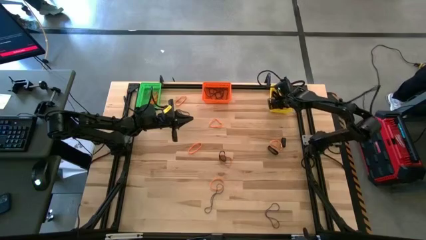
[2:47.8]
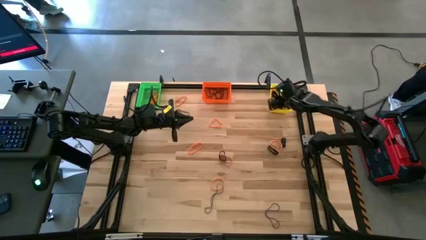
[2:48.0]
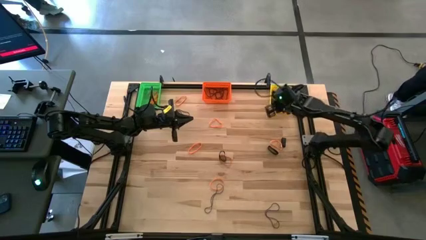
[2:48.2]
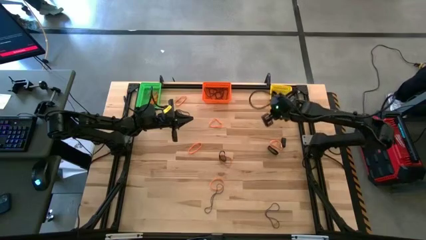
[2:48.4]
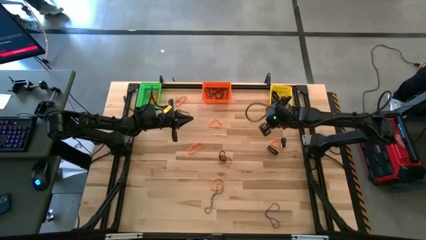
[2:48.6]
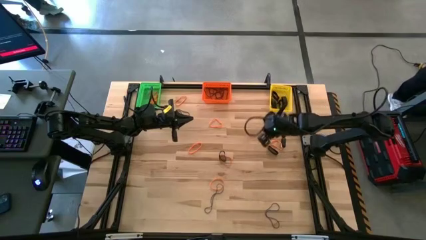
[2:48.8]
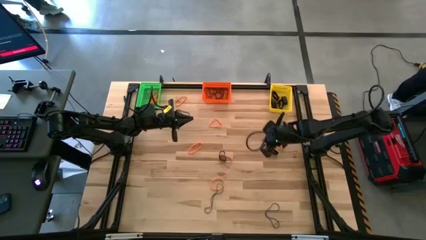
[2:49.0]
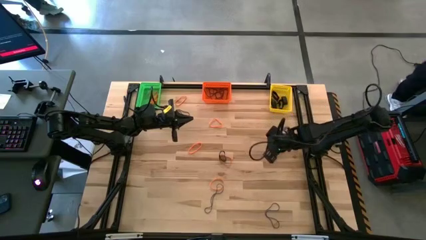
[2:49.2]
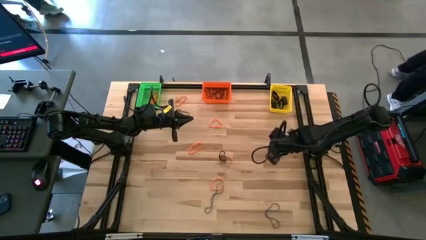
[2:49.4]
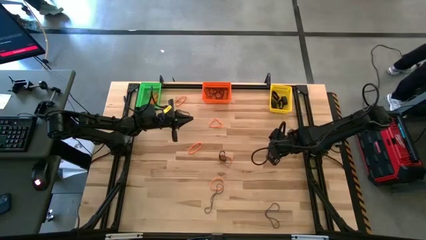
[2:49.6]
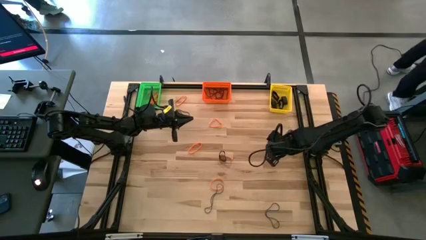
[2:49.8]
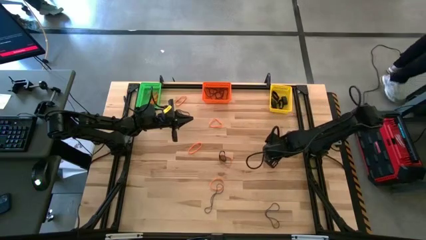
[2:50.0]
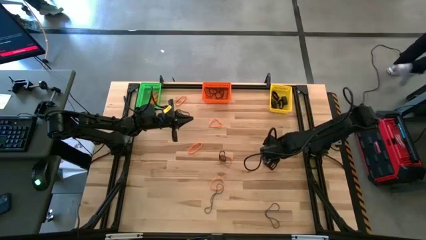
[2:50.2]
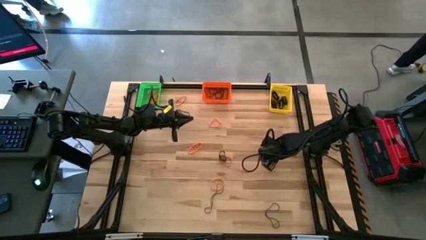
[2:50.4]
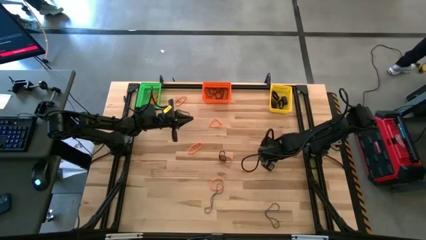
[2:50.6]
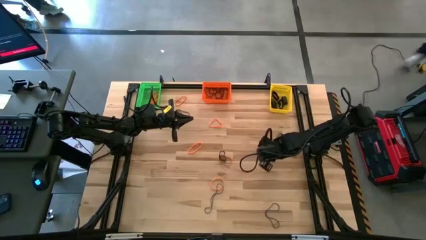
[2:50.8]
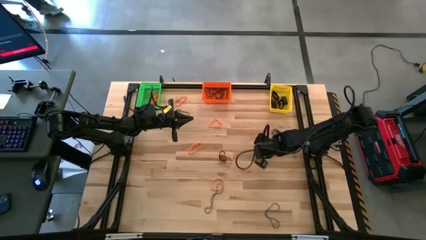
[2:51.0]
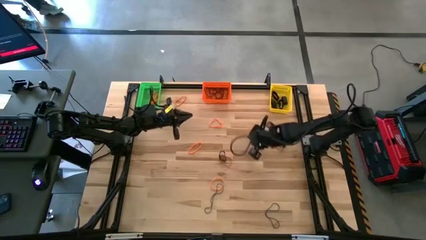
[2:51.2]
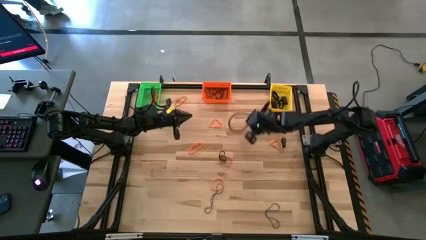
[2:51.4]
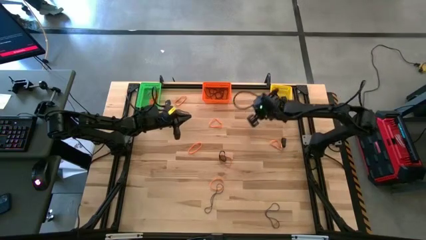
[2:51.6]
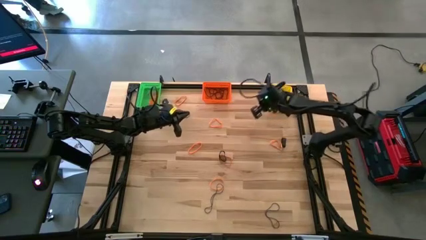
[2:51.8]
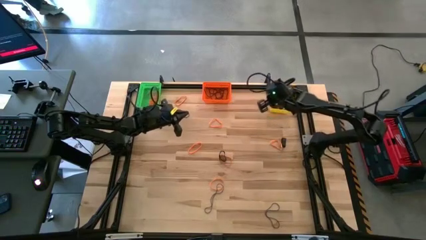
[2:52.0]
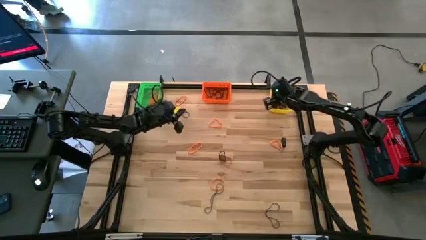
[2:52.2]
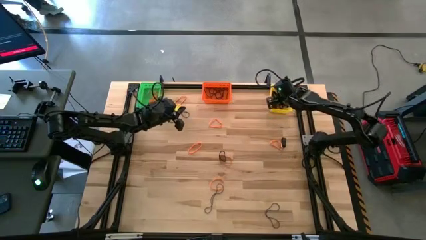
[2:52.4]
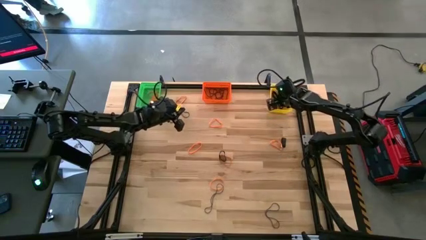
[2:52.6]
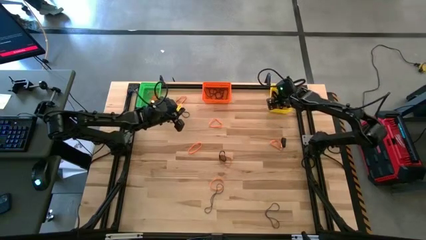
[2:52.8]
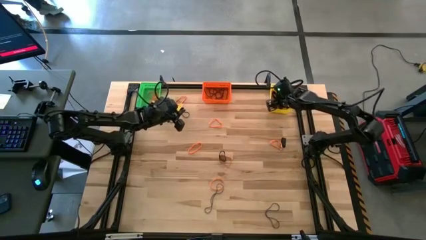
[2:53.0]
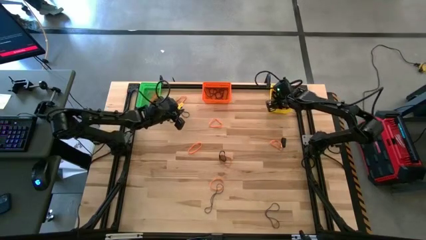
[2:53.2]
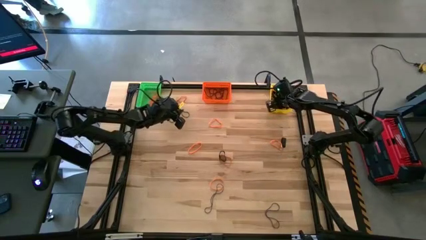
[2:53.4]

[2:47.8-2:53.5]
Task: Sort rubber bands into baskets
Put the right black rubber band into the yellow bin

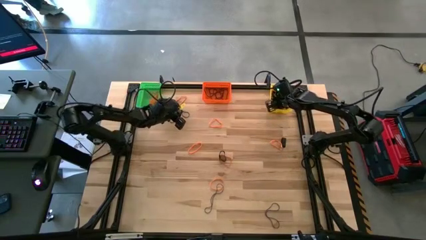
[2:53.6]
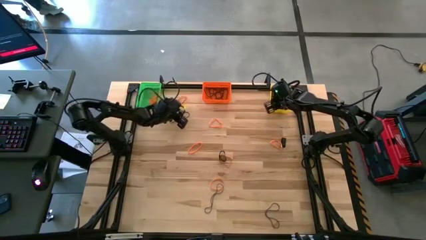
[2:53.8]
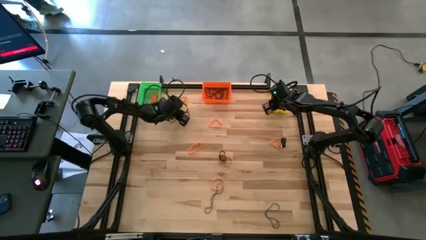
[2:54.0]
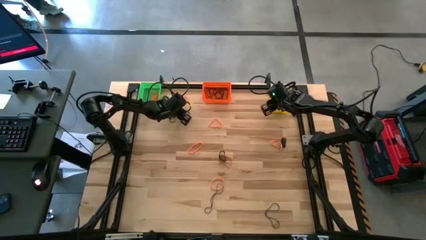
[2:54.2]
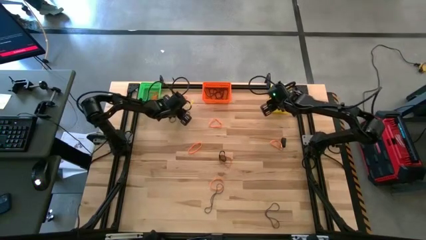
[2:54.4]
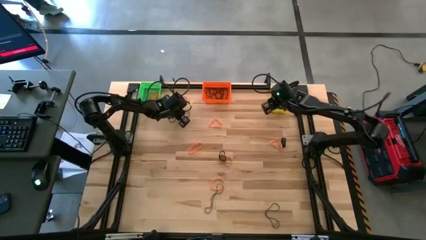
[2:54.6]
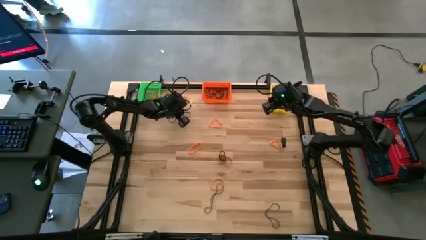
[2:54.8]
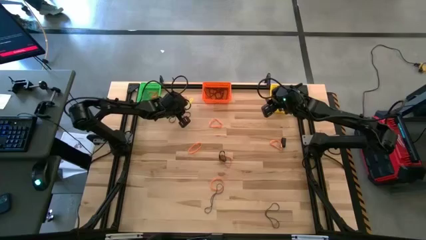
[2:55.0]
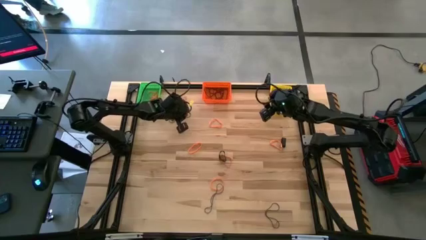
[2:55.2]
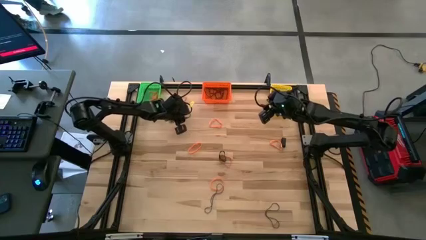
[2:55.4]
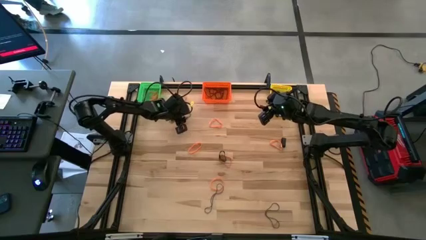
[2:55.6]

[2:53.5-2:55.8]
Put the top blue rubber band into the orange bin

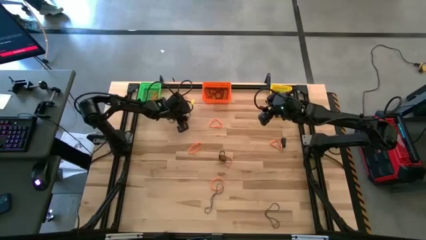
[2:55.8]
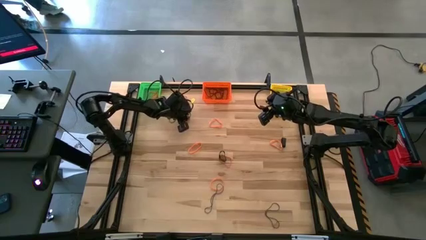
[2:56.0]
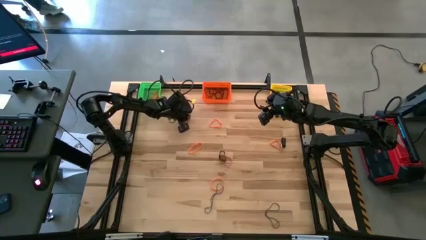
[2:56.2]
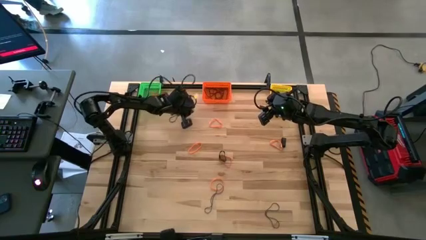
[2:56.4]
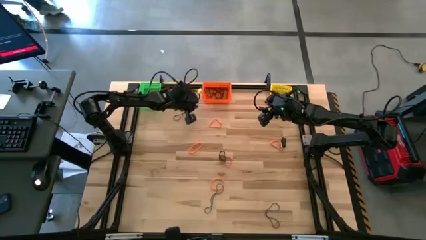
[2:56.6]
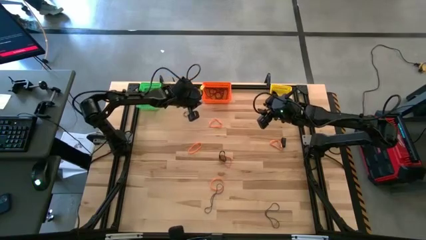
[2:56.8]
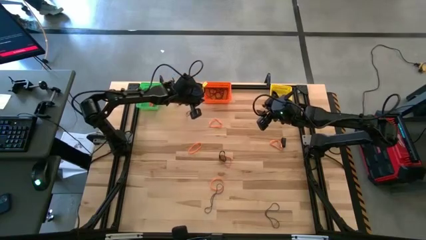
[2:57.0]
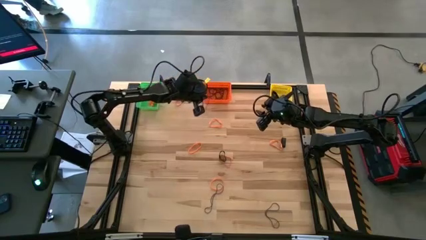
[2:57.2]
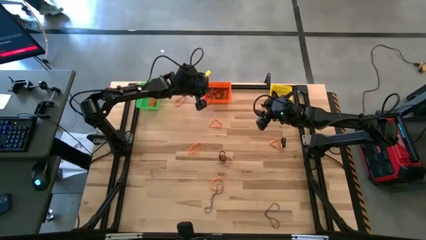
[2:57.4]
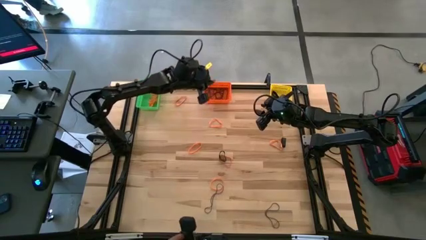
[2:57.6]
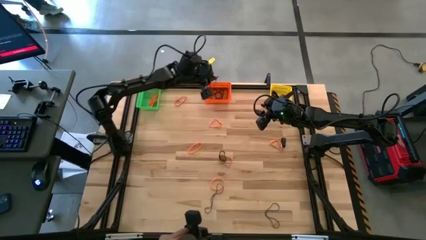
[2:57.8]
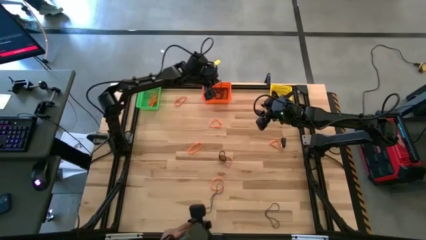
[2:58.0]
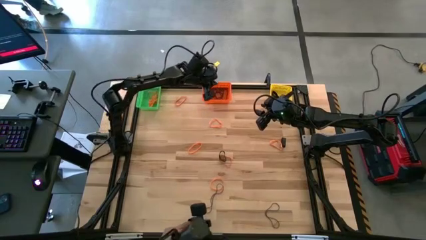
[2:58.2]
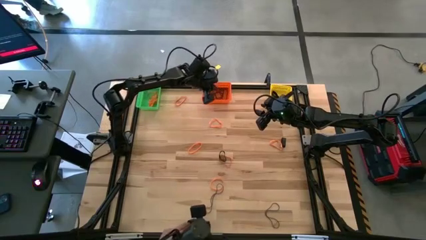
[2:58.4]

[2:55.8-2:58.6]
Put the top blue rubber band into the orange bin

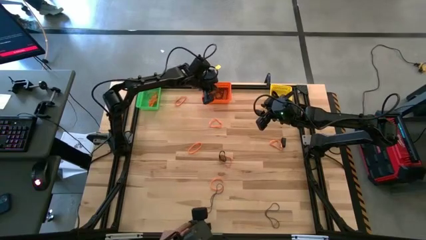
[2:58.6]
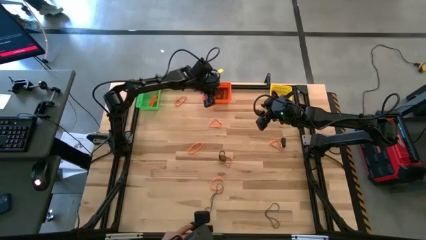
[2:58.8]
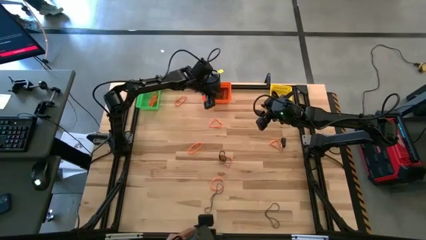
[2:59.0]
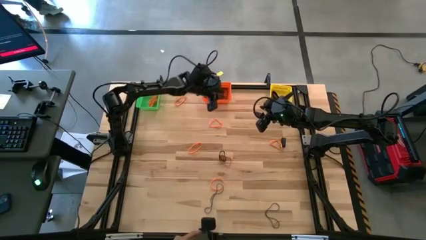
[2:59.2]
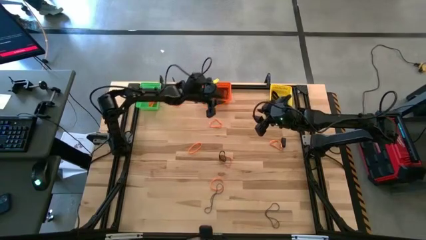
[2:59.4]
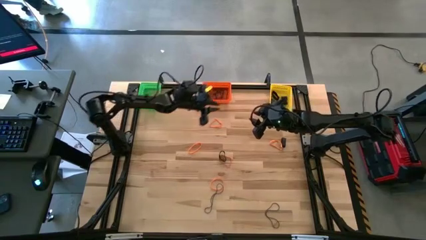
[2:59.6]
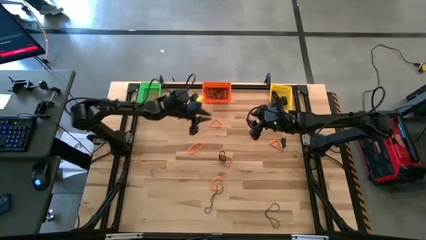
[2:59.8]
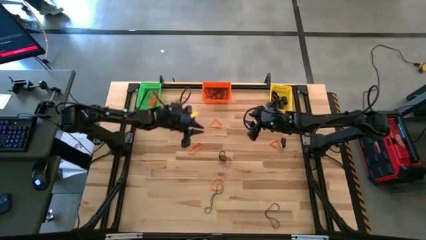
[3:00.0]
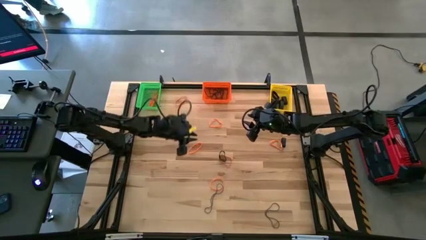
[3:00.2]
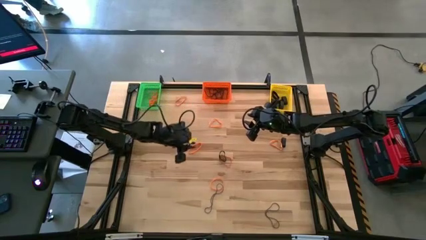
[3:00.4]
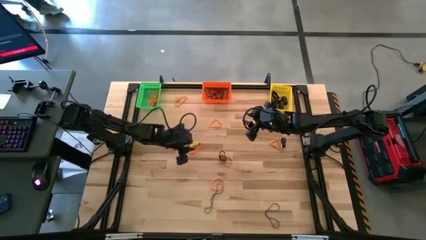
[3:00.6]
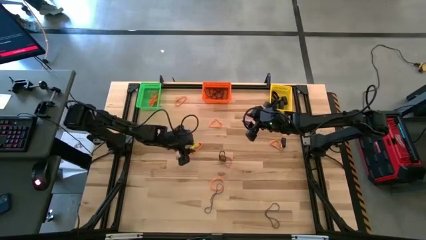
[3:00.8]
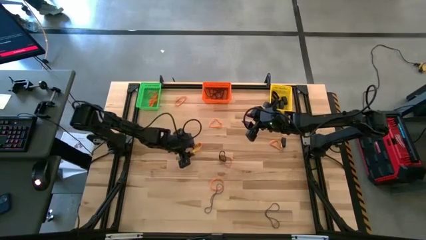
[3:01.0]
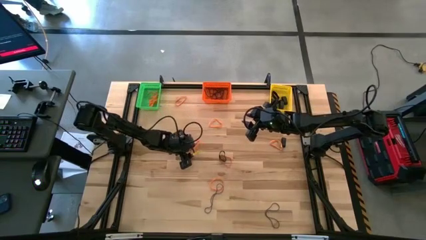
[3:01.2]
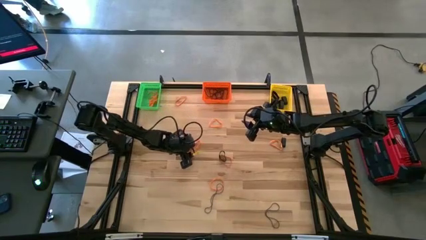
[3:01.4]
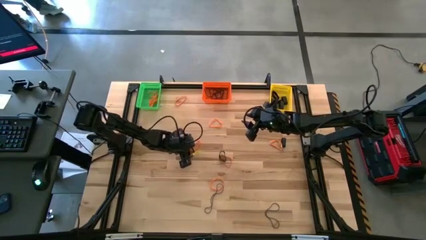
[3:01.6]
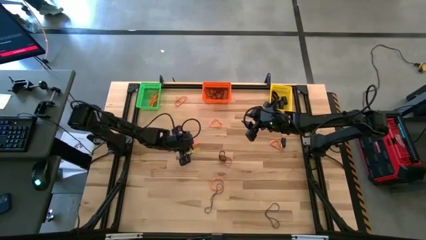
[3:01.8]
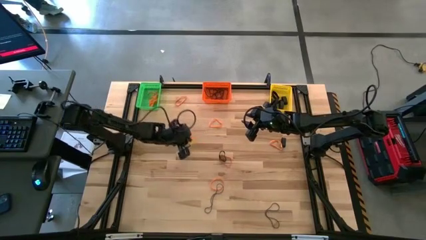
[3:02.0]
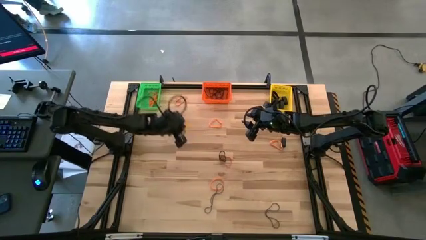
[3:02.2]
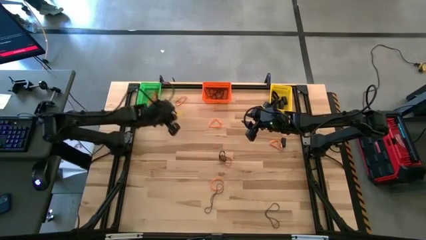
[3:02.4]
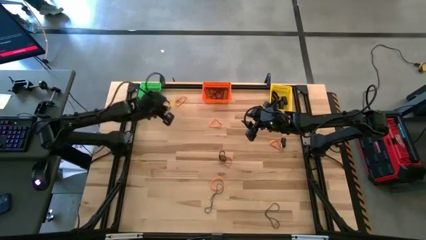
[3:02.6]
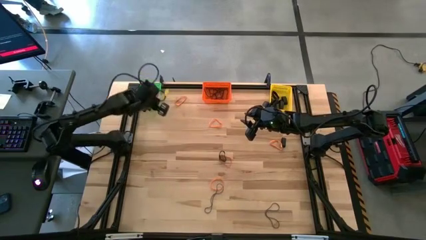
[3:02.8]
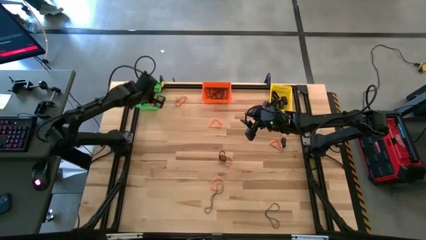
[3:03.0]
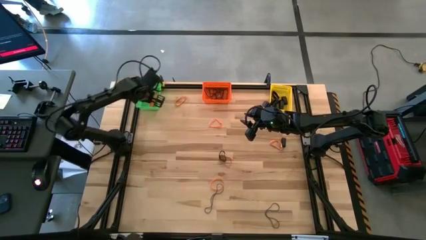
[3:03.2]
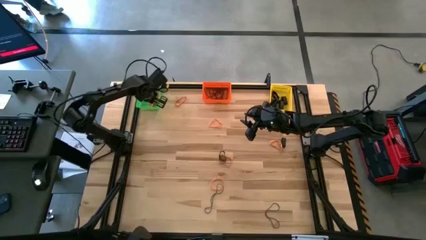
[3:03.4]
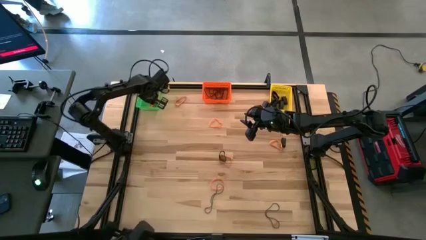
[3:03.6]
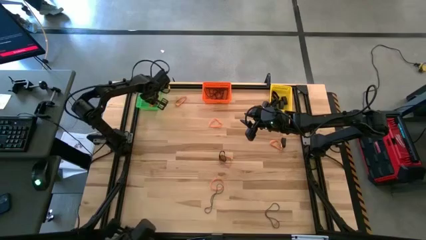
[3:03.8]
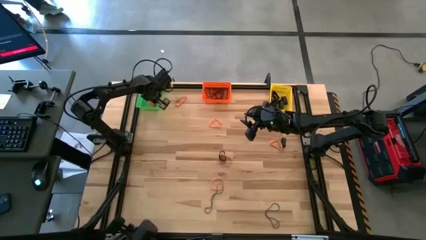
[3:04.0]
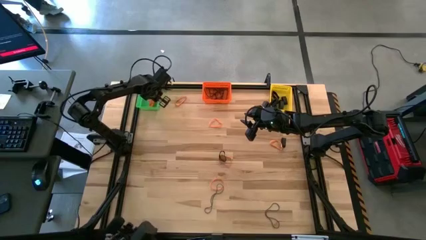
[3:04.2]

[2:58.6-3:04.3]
Put the middle left orange rubber band into the green bin
